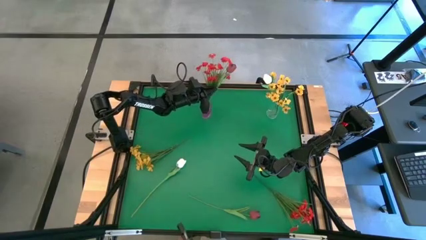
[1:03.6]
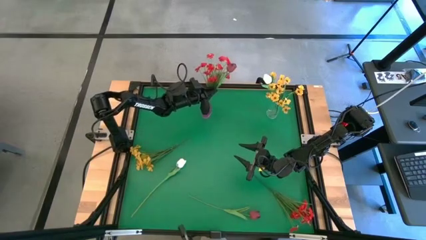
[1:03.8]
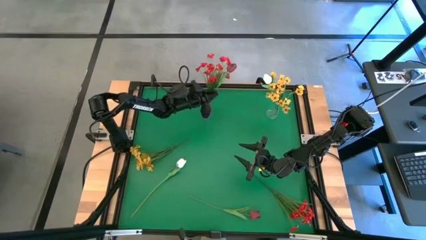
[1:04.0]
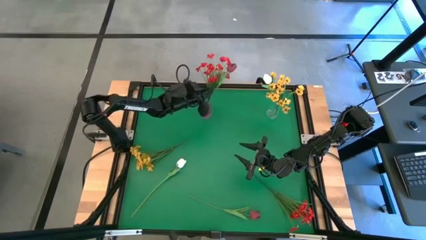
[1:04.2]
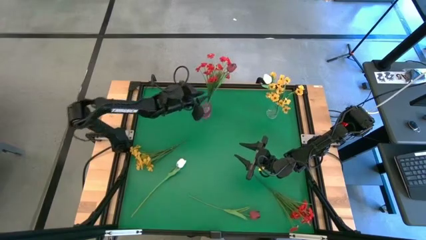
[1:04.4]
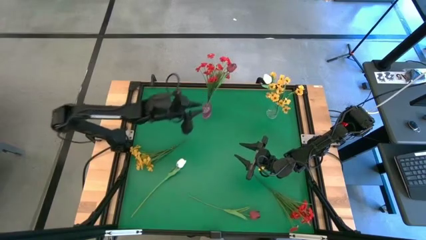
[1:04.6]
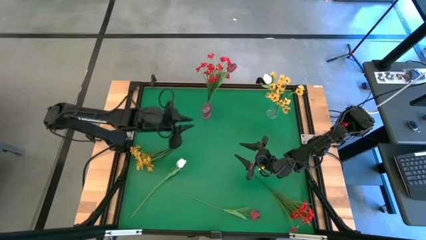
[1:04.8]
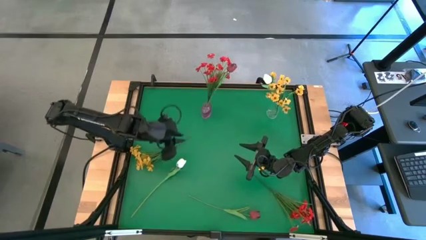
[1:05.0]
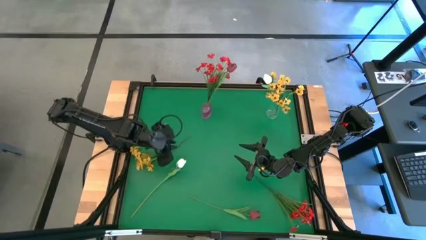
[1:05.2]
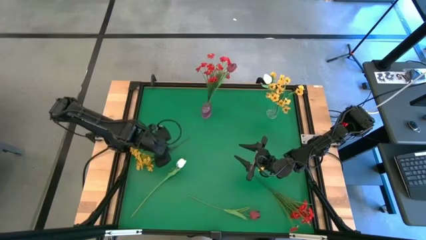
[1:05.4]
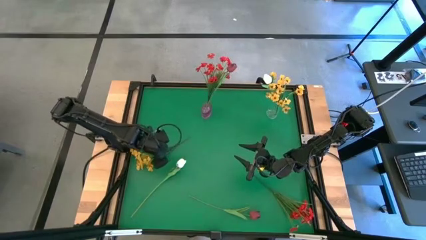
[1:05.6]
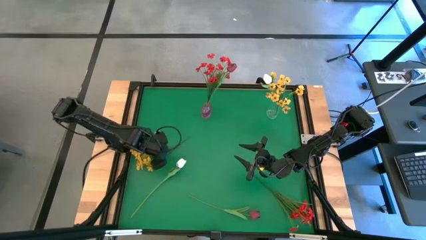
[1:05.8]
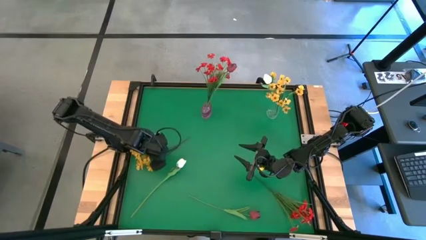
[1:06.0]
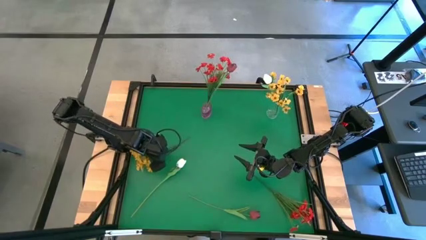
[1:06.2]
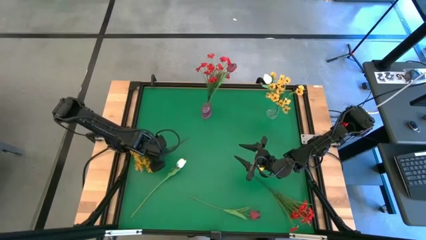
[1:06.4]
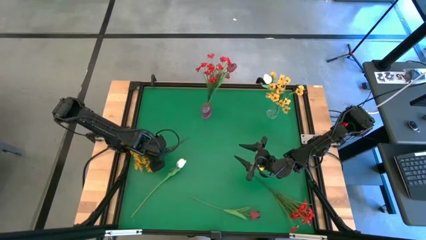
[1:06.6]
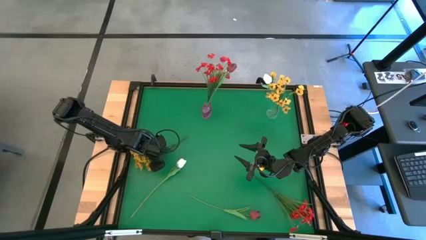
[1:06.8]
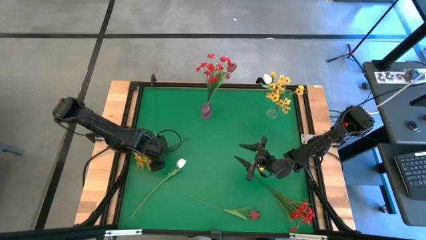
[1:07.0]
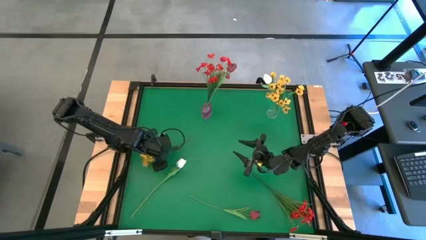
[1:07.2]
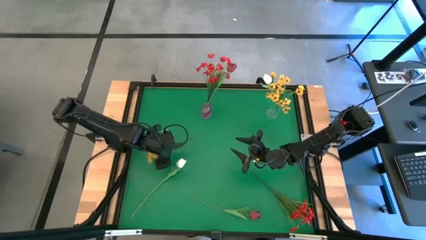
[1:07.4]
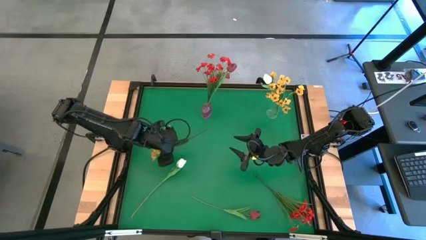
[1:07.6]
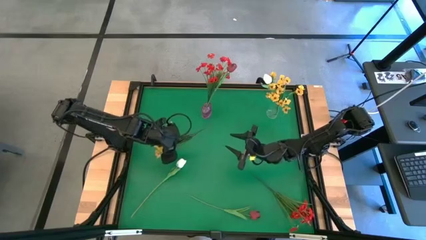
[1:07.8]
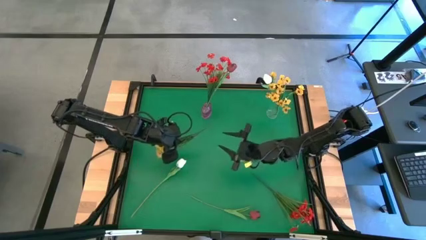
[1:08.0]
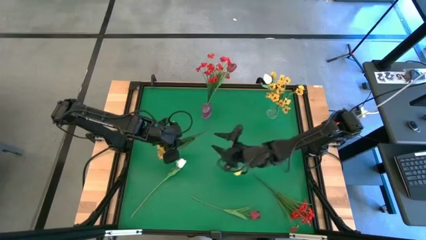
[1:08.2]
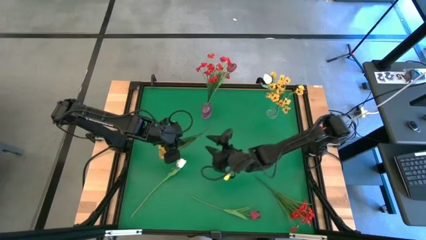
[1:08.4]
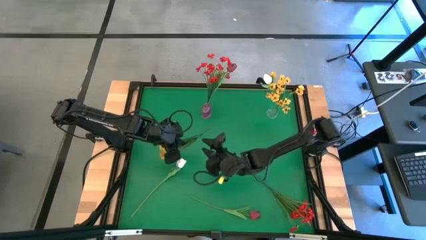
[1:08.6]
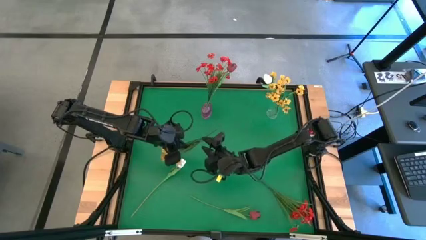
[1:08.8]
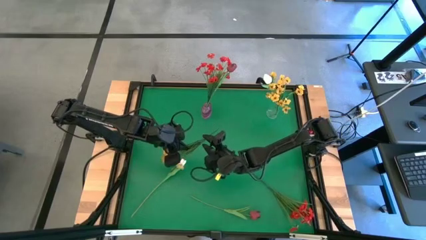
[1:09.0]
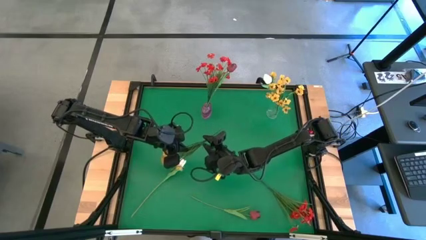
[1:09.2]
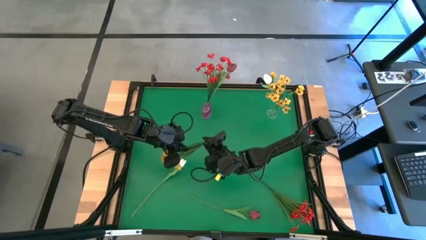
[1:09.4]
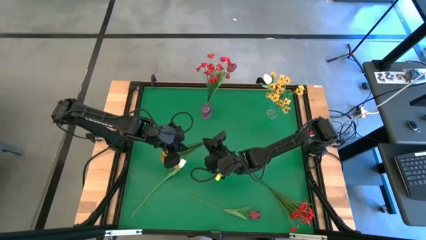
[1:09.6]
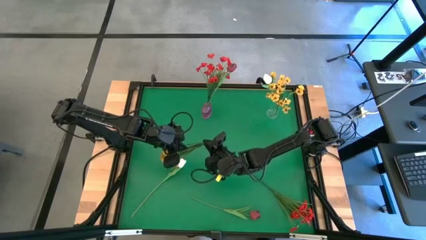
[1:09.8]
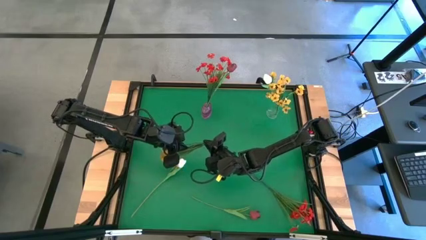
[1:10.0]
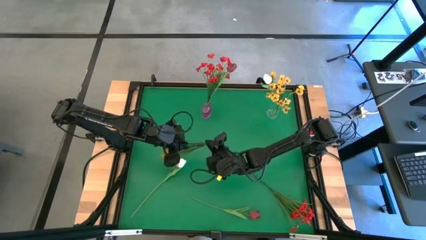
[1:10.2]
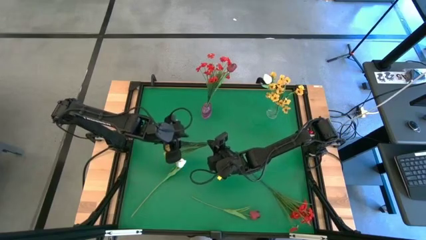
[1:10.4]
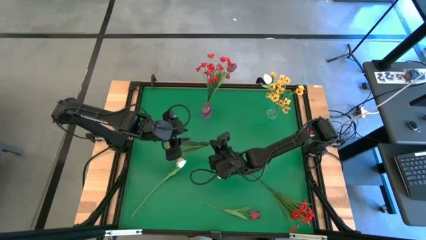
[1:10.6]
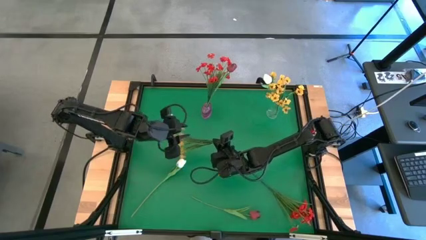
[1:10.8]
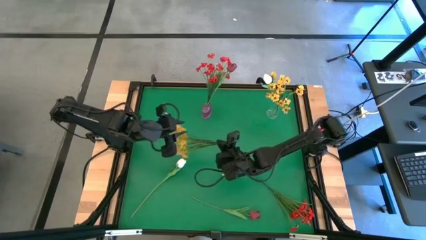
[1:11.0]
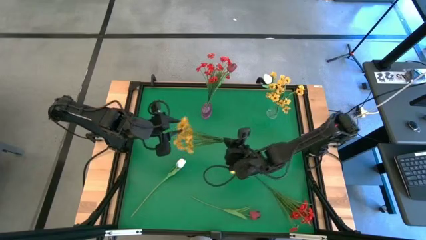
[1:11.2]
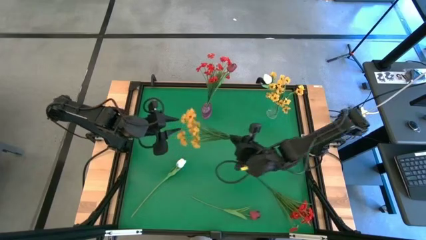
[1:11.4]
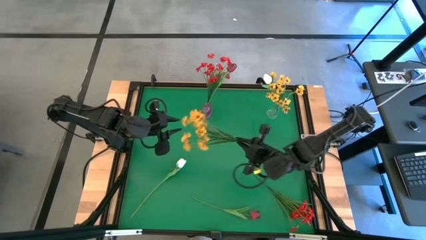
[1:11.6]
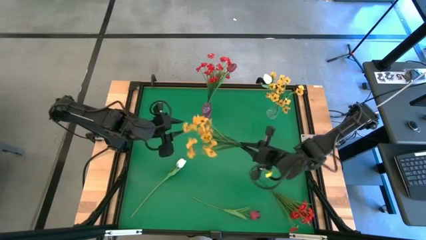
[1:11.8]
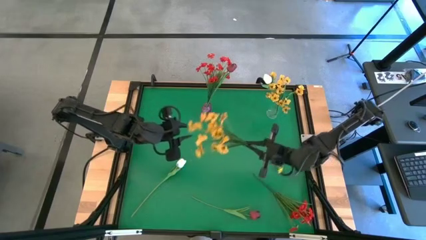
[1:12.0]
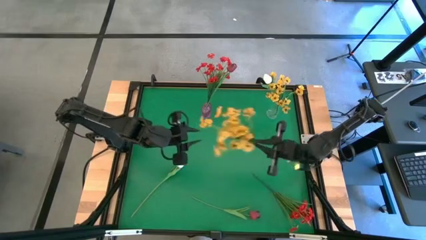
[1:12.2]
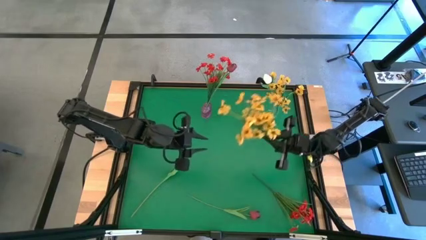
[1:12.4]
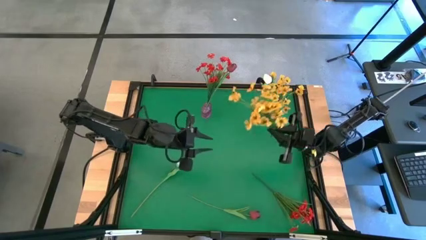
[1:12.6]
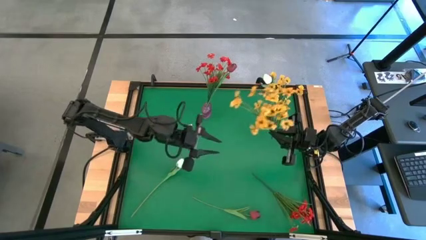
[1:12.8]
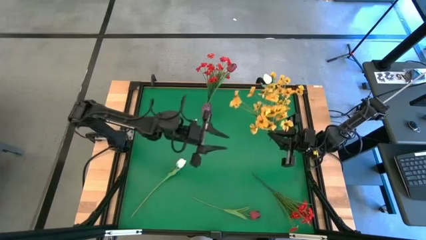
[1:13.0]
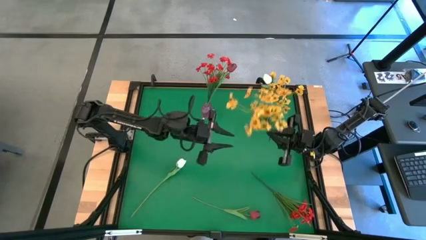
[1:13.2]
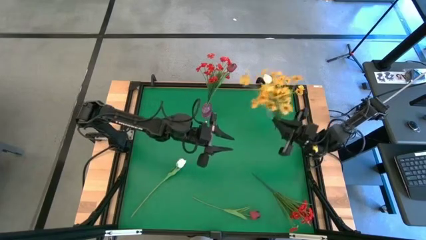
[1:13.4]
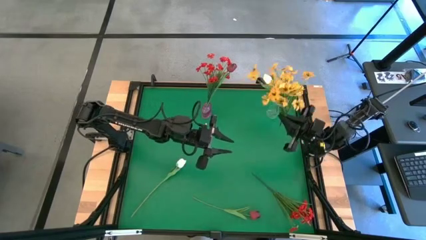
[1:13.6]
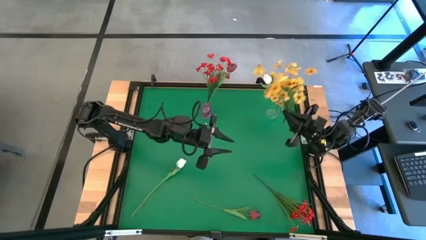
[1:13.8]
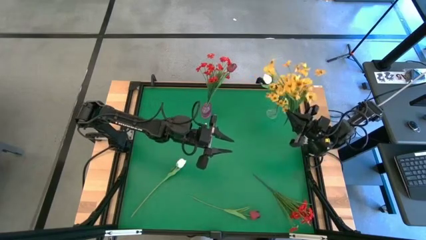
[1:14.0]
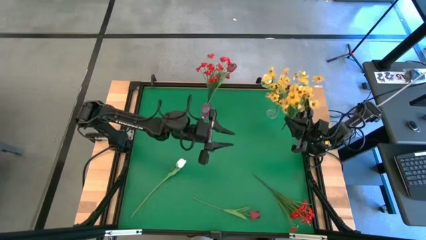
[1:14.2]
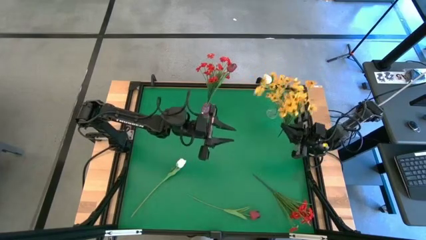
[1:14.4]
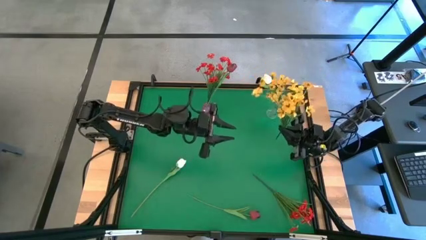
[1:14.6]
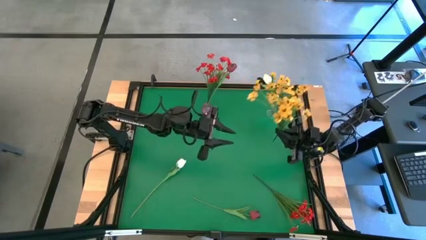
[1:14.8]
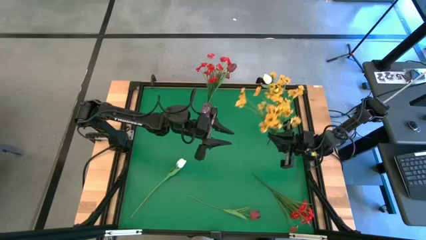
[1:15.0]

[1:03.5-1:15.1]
Task: Sort flowers into vase by color
Put the yellow flowers into the transparent vase

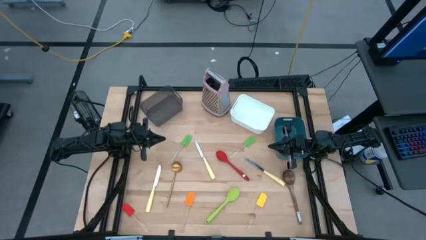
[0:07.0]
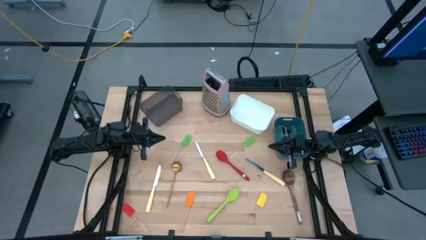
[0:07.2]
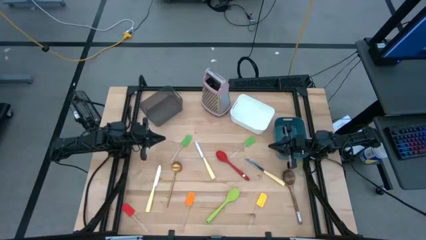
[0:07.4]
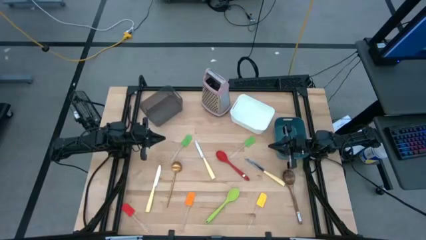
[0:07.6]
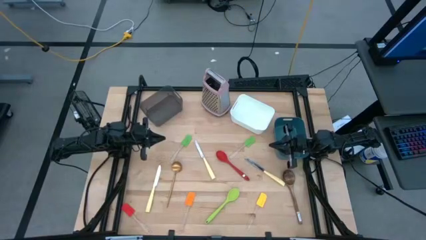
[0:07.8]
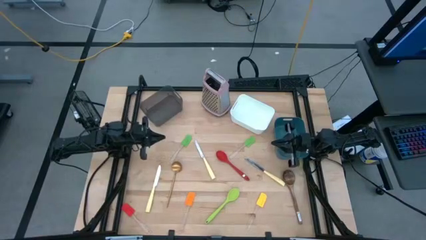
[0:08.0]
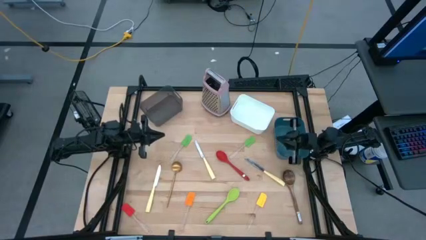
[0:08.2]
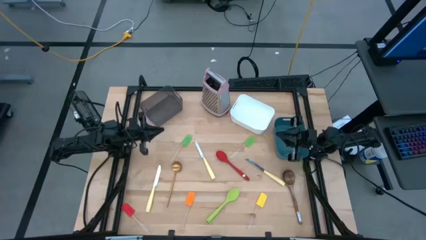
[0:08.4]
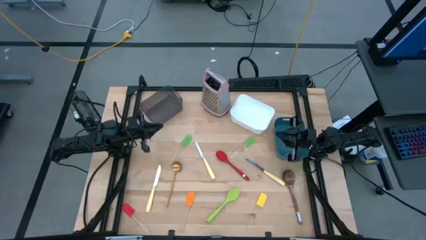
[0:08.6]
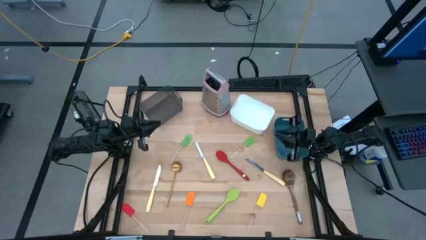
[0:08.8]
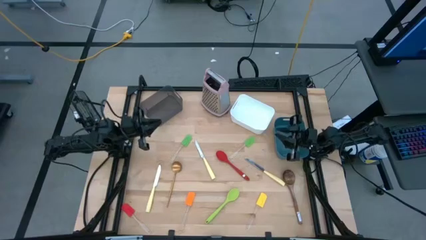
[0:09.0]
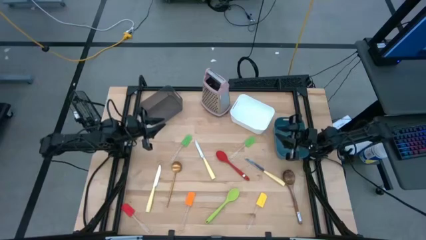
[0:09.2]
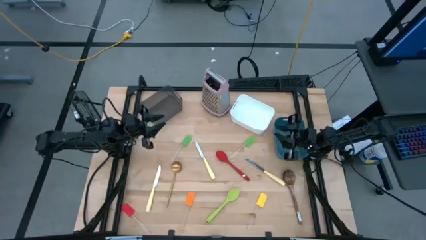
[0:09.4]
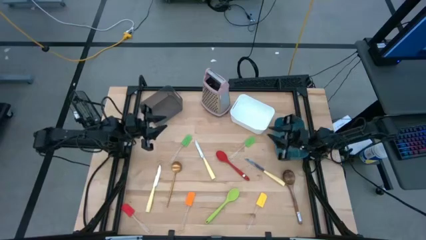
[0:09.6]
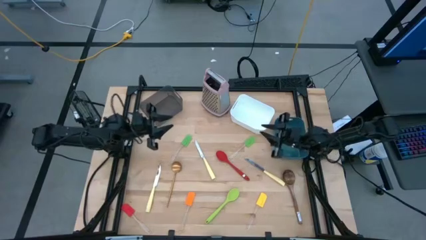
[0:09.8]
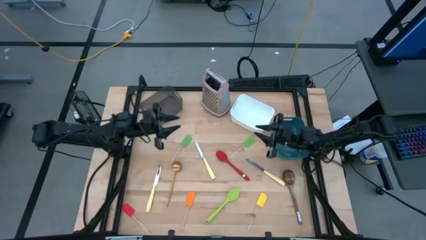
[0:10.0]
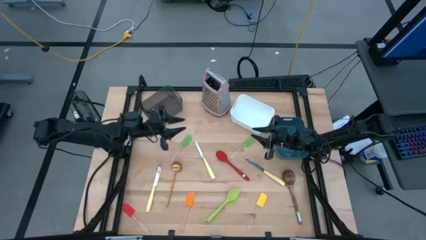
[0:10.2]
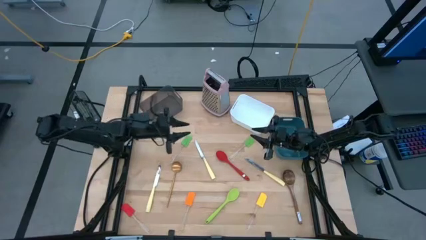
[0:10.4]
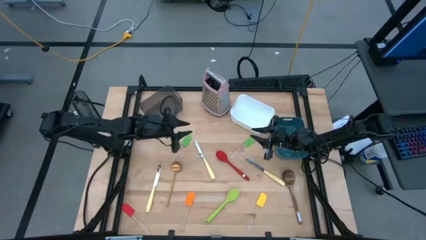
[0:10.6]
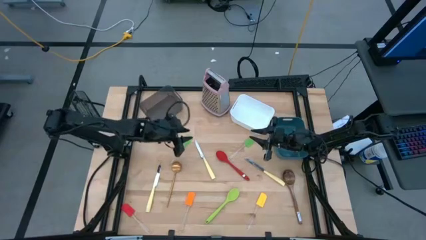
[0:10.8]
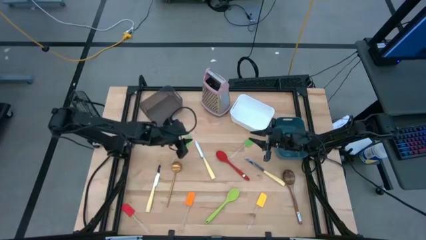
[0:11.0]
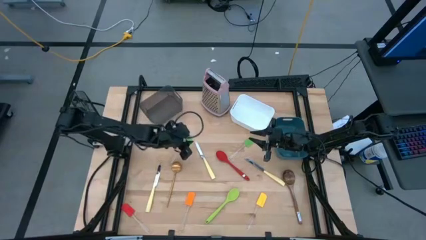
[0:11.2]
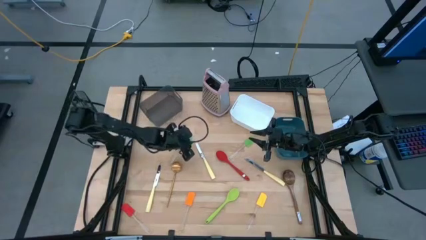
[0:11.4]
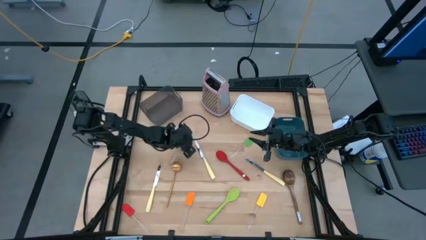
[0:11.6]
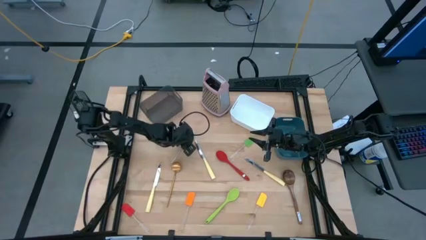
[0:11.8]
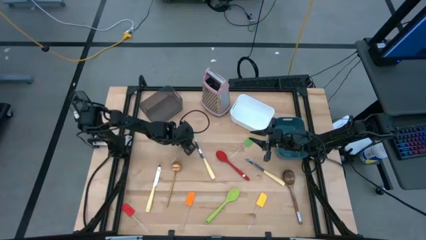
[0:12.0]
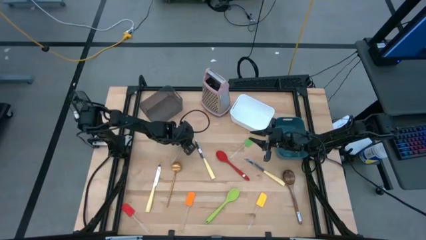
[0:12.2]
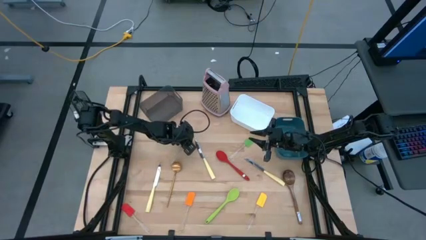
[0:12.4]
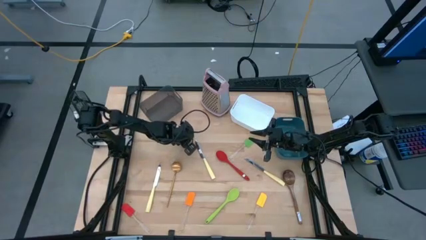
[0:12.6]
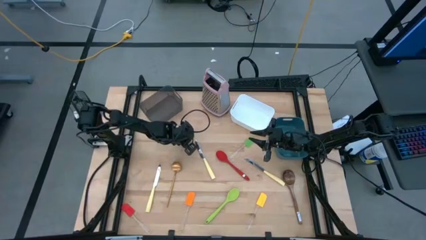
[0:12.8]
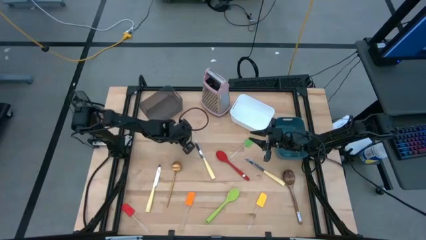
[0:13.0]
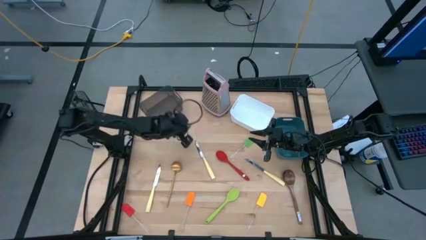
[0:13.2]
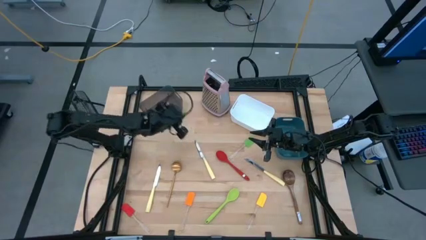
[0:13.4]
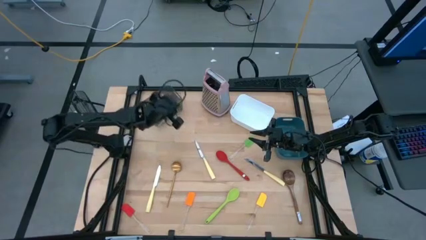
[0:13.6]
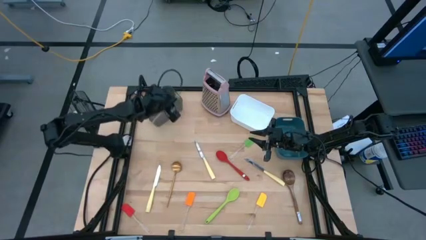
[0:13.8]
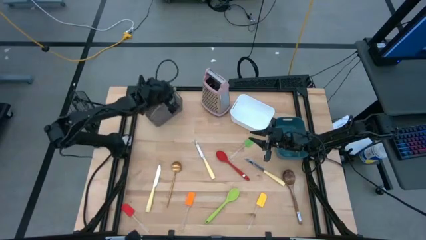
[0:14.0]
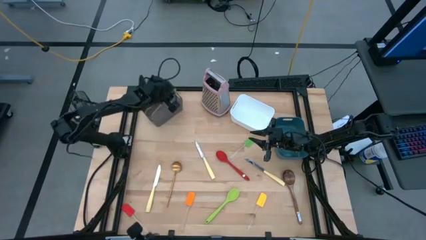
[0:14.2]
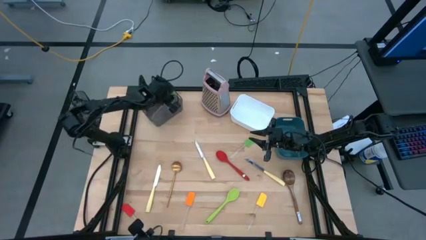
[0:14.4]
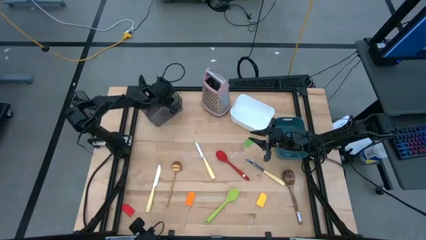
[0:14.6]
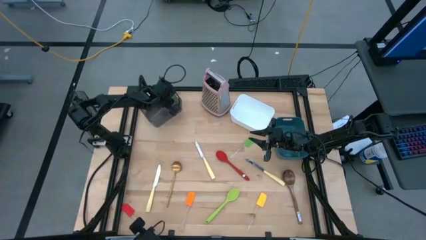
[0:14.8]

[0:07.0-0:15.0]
Task: Pick & Place Kitchen Items
Put the left green spatula into the black bin
